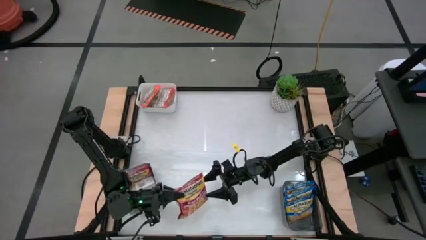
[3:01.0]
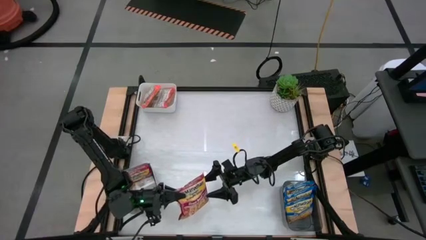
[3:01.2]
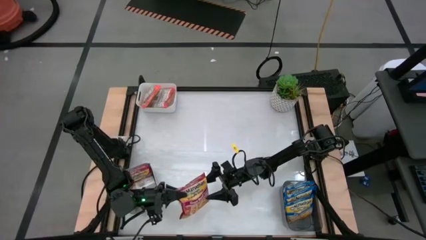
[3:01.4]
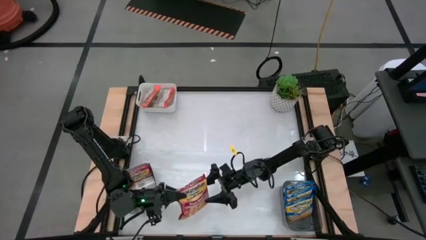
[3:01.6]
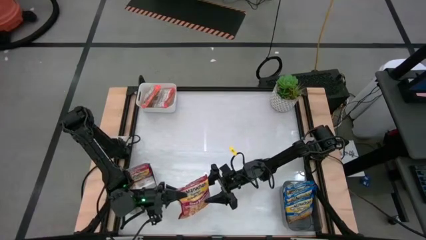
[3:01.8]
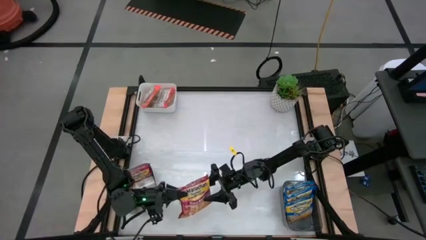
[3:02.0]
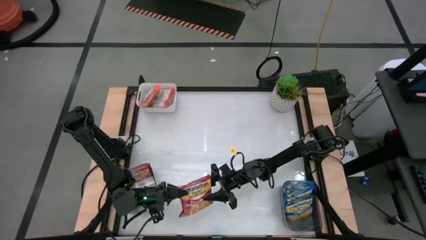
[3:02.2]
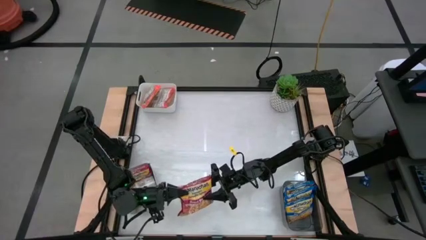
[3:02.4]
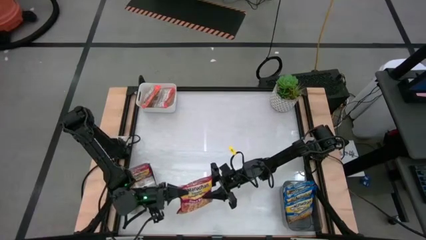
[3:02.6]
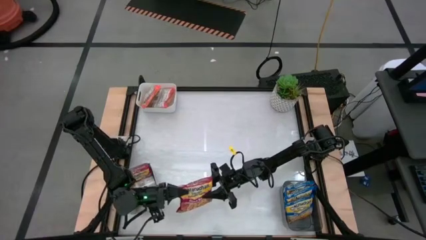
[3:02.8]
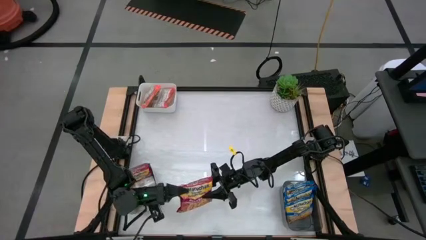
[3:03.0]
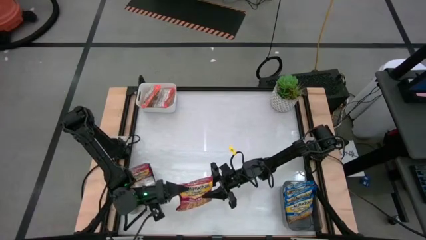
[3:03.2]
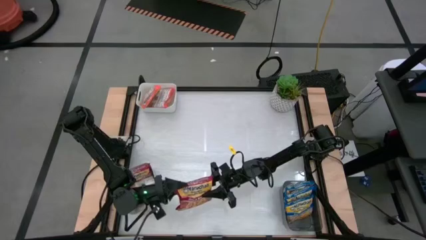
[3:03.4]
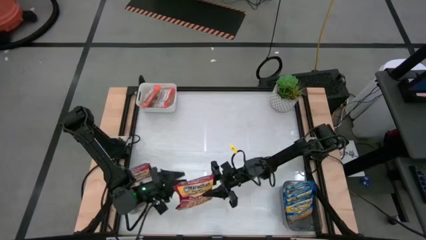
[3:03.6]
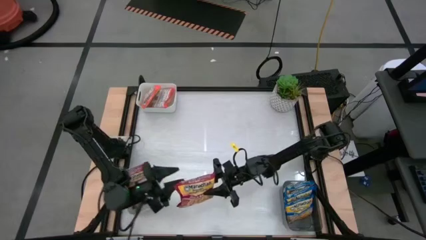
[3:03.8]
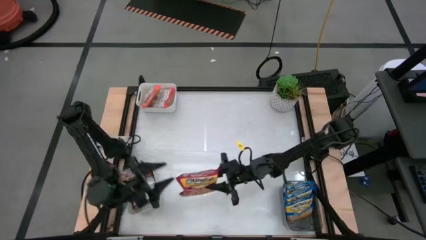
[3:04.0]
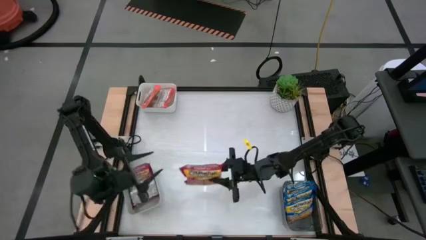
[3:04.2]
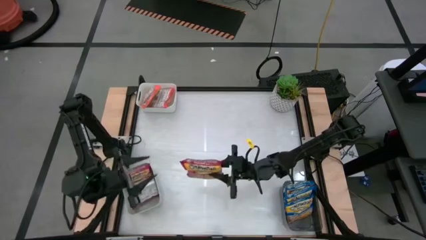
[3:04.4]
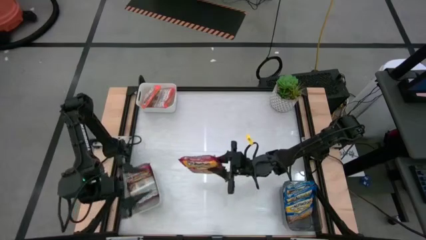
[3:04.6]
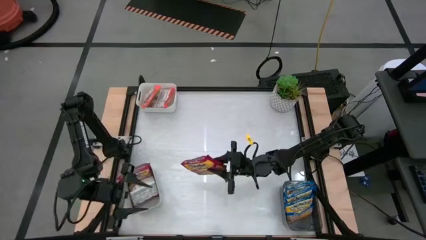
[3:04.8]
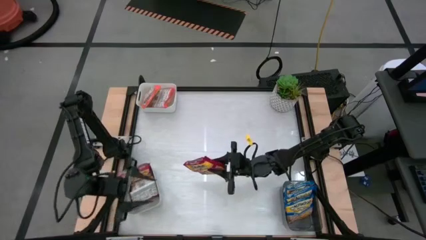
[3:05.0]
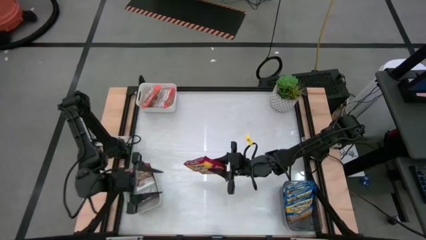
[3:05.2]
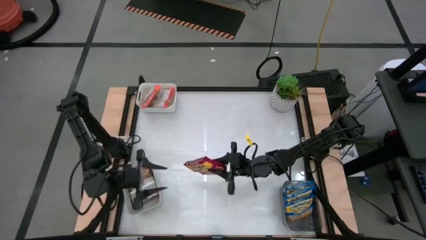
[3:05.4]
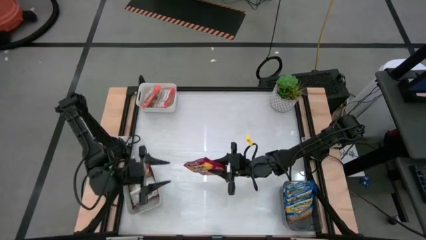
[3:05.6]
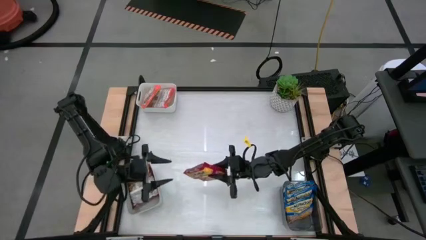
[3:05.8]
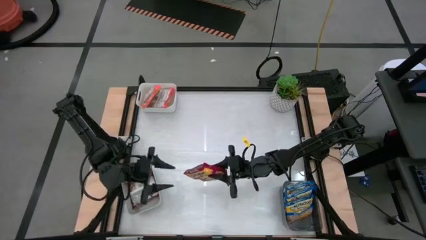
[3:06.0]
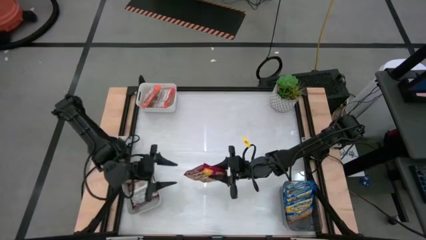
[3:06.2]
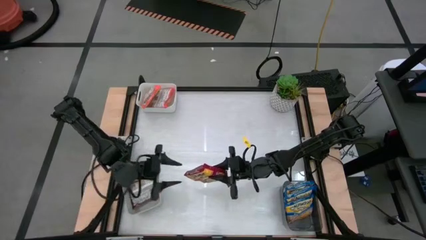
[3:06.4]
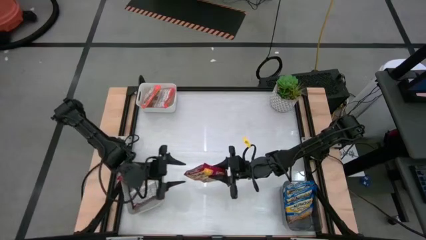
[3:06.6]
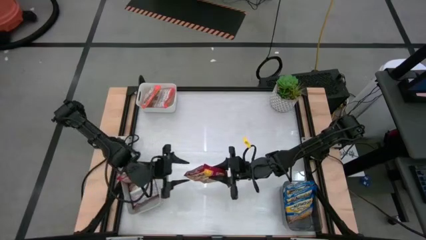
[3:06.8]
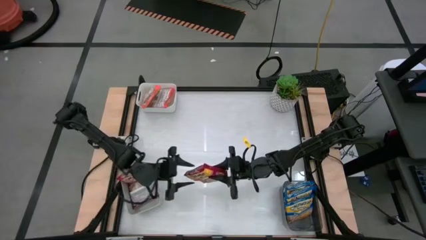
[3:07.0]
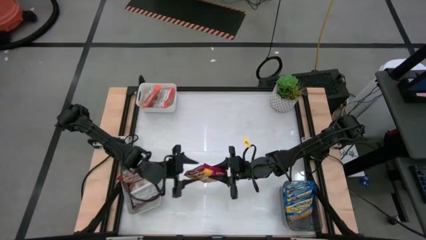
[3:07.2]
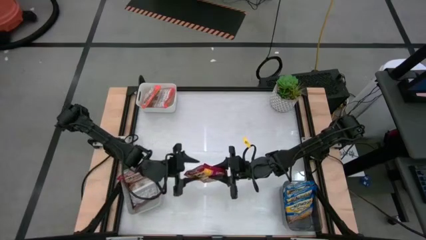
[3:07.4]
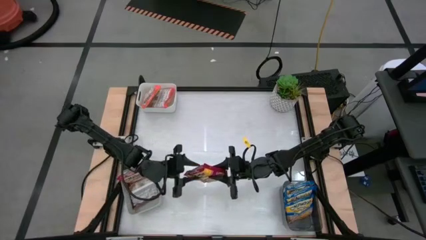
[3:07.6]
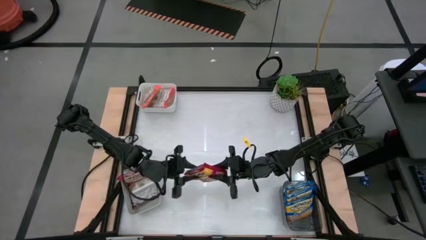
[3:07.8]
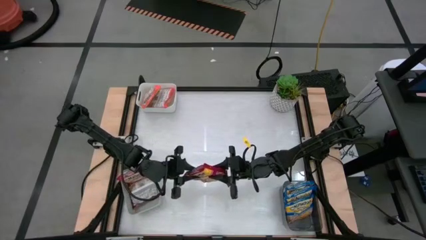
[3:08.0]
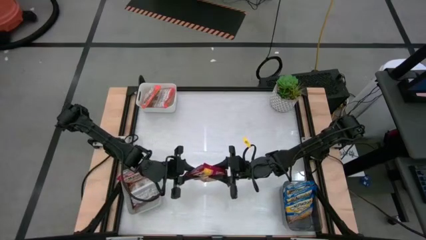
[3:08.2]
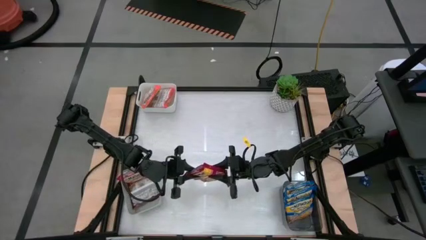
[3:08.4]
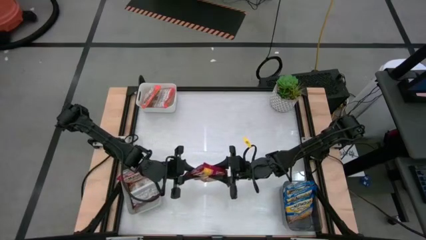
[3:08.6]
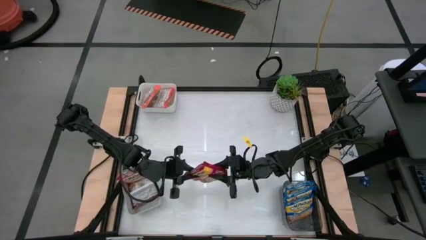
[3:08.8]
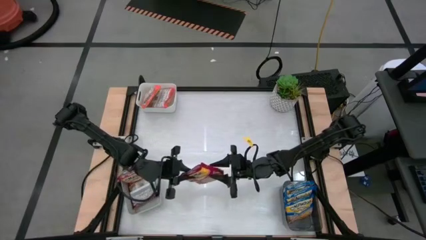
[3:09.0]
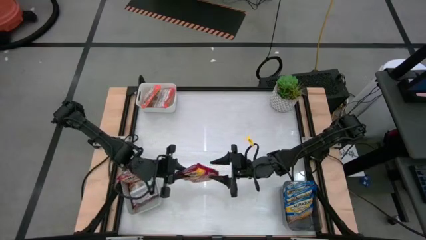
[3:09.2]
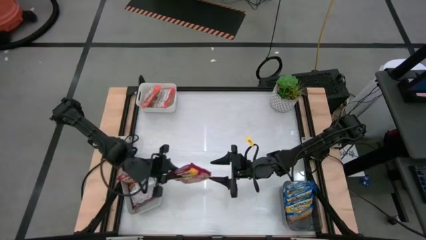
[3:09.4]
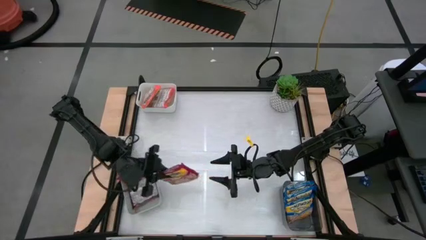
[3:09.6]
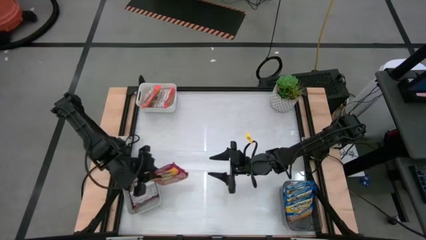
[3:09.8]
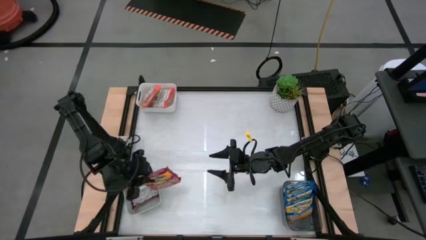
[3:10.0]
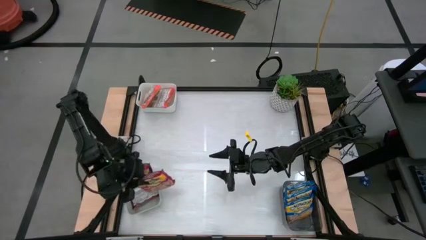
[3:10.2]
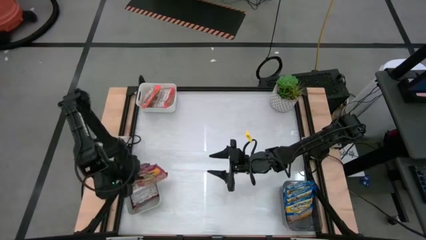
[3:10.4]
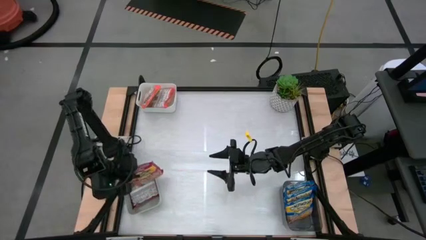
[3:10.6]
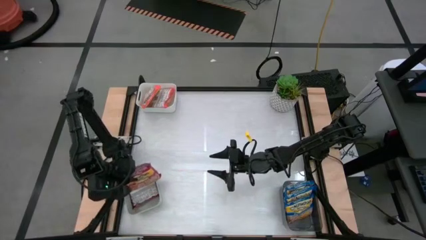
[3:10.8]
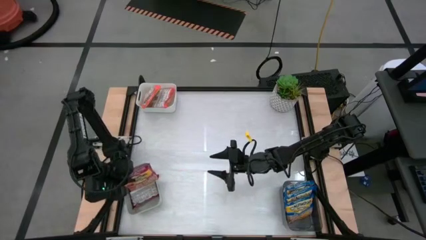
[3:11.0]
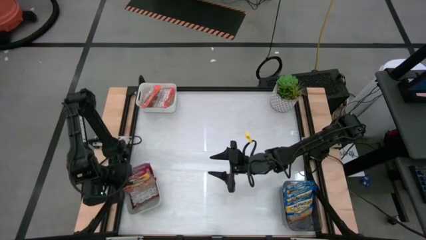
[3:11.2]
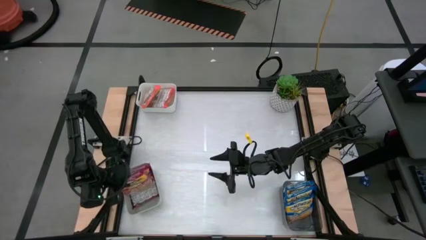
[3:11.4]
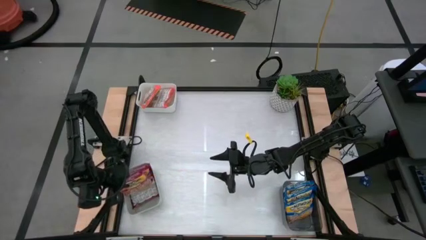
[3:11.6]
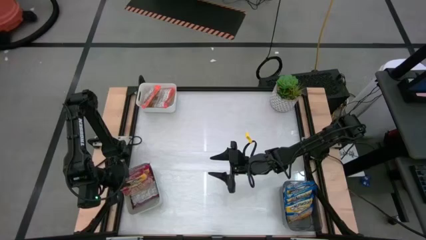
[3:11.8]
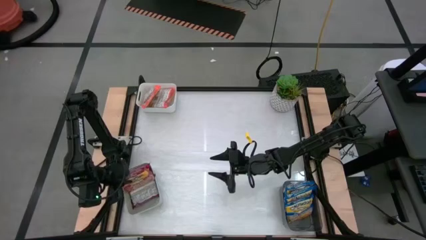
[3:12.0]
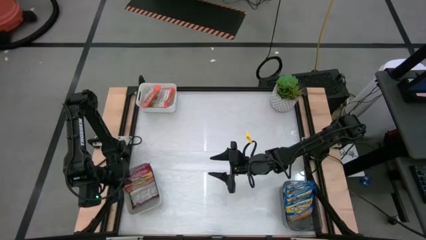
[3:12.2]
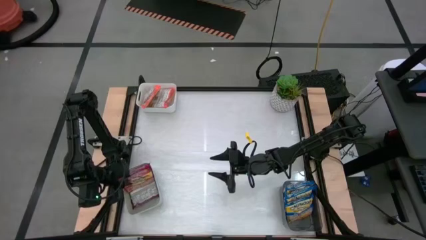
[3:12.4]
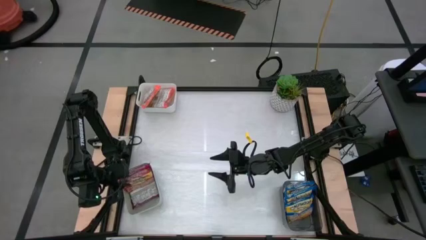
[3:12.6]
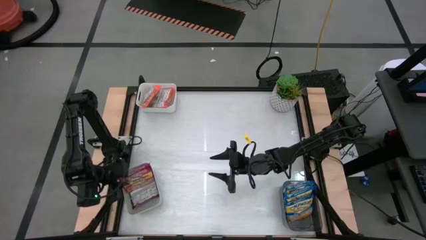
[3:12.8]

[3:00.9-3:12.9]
Task: Sort Maruchan noodles
Put the red noodle pack into the gray bin

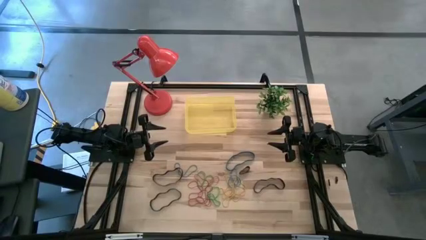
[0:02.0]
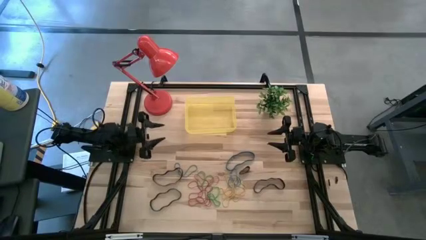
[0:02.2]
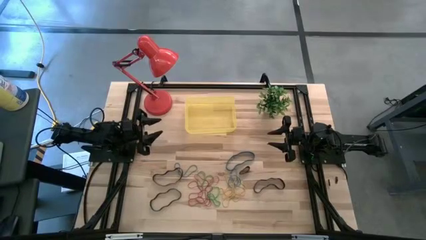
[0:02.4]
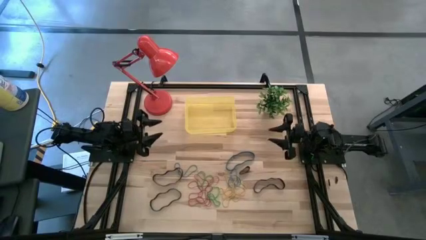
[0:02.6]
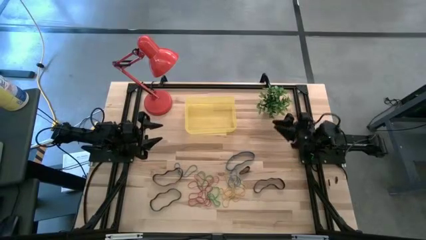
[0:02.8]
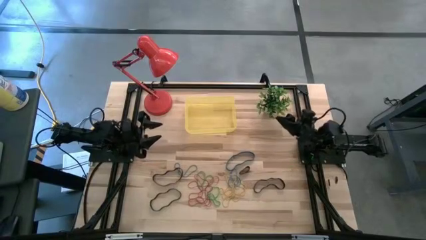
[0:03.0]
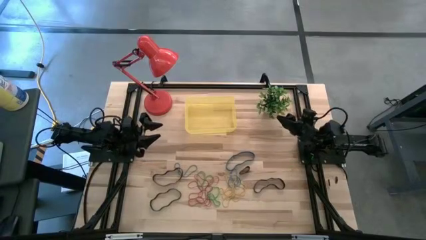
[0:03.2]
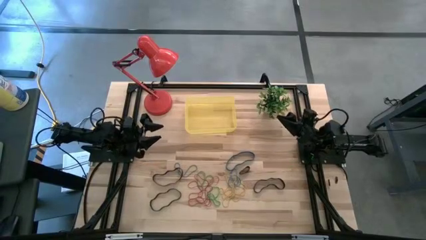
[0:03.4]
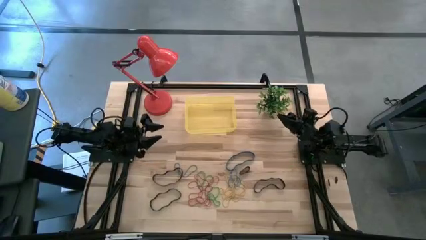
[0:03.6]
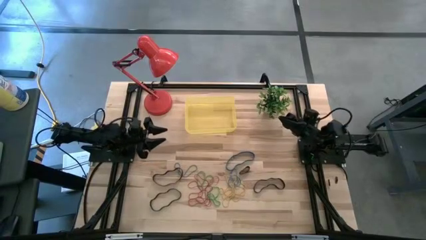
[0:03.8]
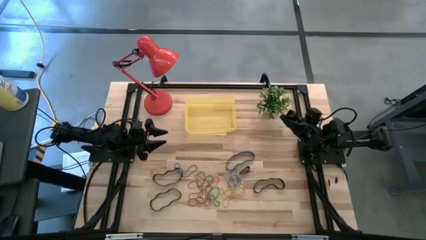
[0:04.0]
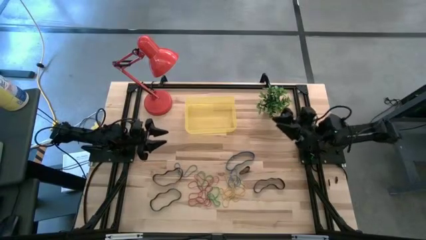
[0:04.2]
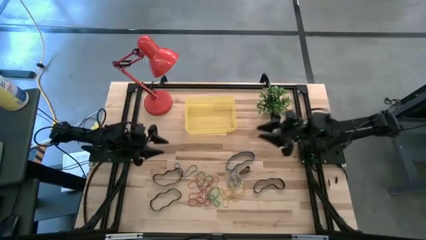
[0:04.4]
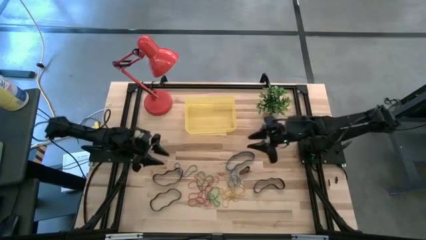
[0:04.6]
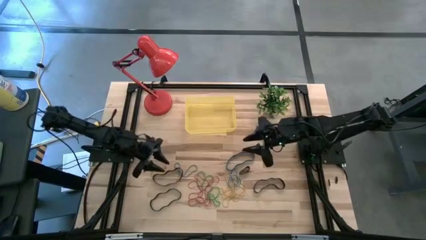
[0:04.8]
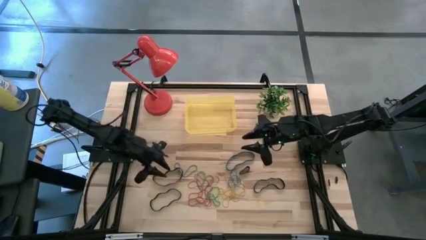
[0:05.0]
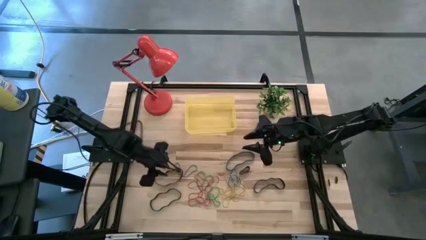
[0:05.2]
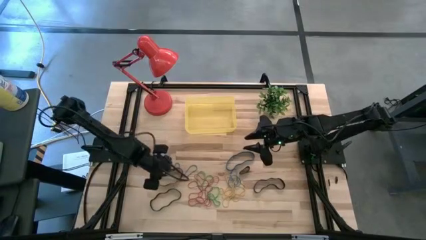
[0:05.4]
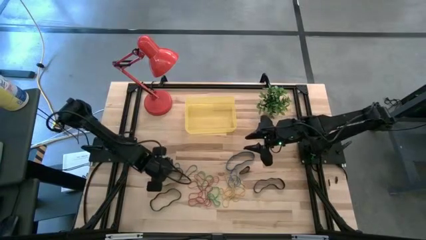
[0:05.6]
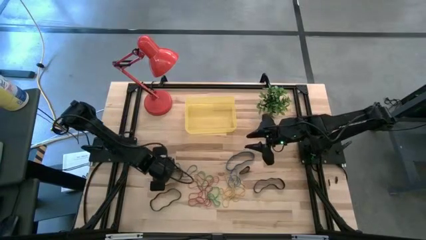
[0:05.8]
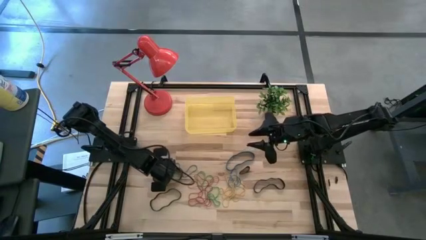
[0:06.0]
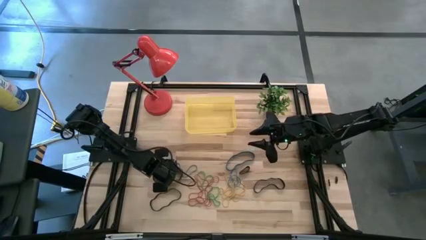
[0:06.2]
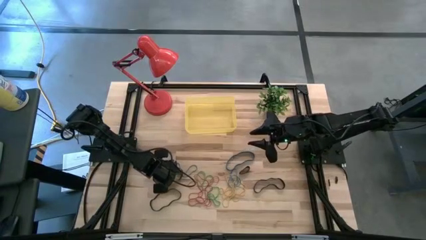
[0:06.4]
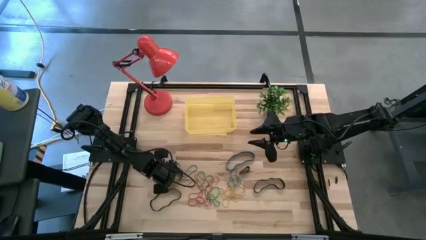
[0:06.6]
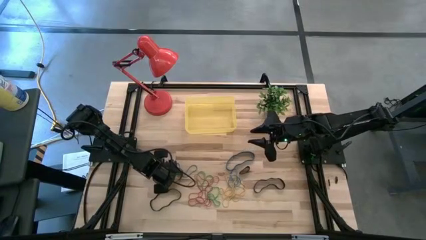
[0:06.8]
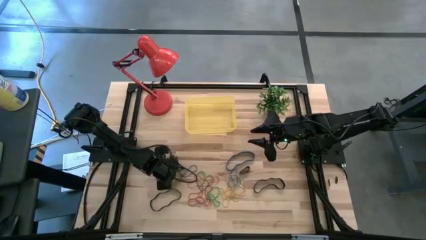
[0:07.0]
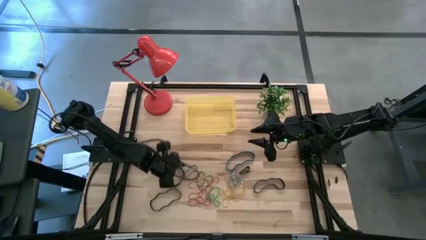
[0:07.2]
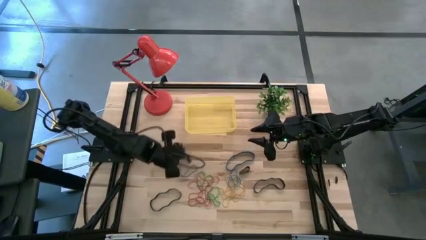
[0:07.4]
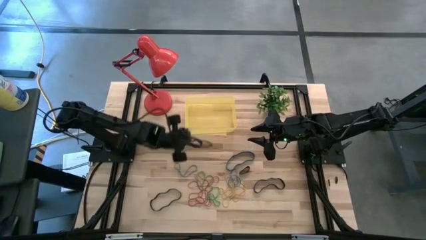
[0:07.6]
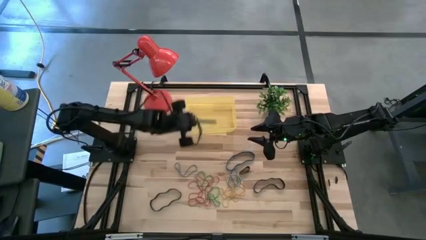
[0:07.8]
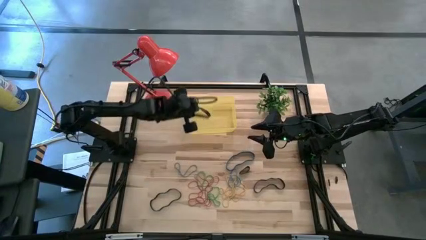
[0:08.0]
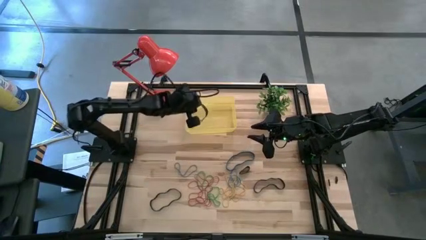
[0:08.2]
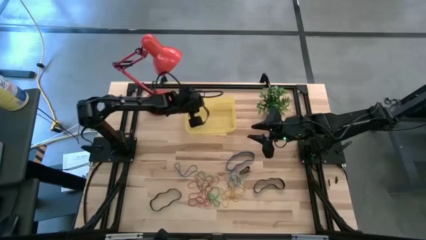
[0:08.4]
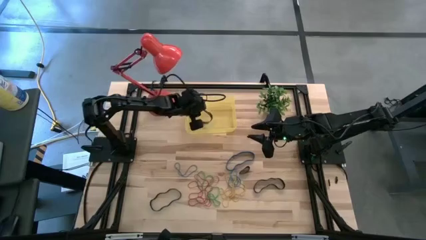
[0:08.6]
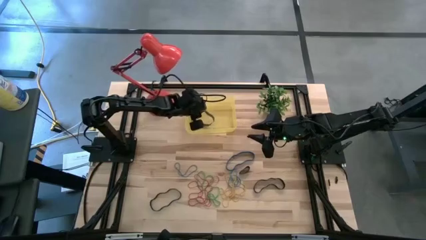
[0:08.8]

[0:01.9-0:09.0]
Task: Pick and place rubber bands into bin
Put the black rubber band into the yellow container
